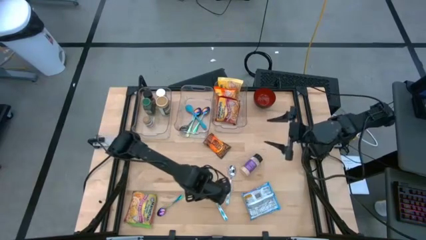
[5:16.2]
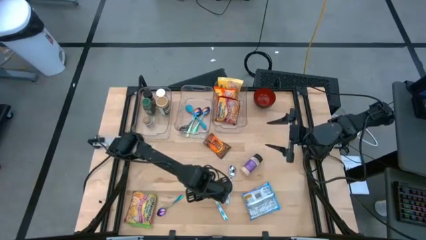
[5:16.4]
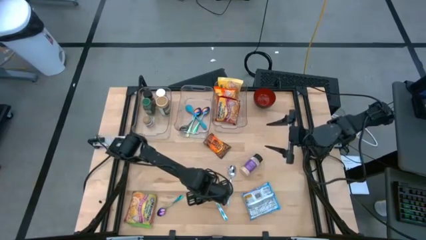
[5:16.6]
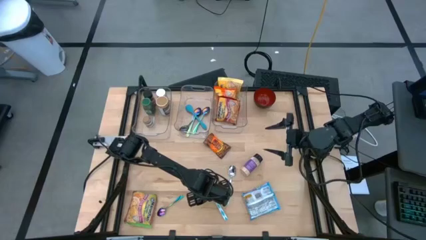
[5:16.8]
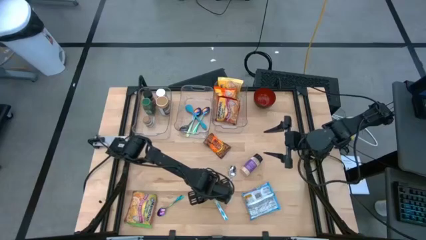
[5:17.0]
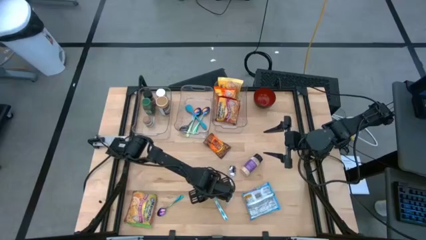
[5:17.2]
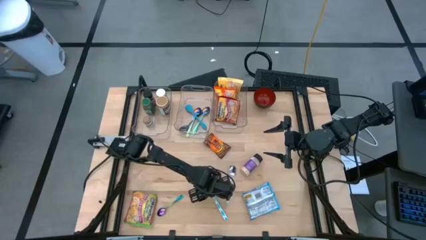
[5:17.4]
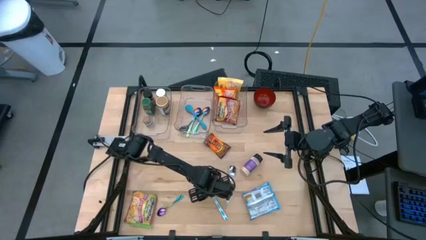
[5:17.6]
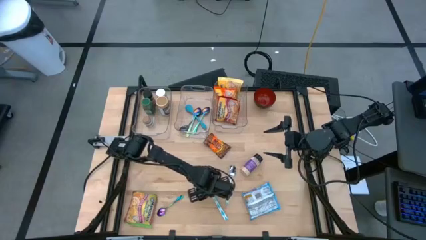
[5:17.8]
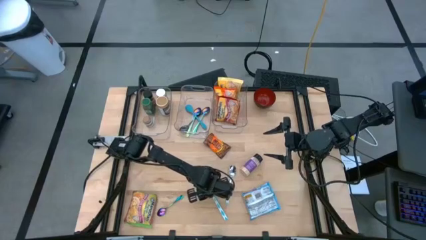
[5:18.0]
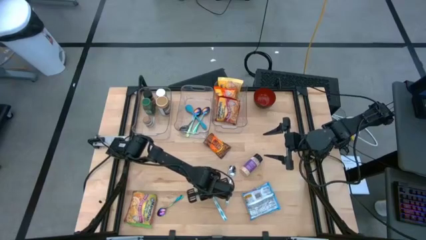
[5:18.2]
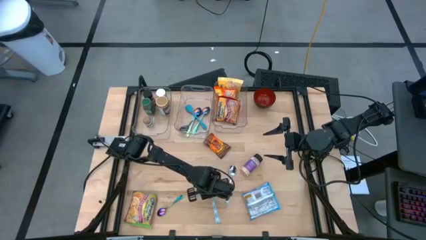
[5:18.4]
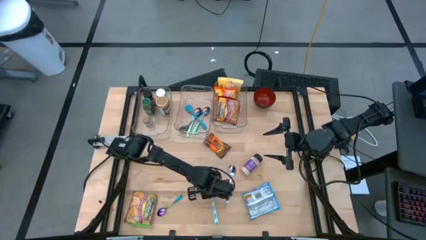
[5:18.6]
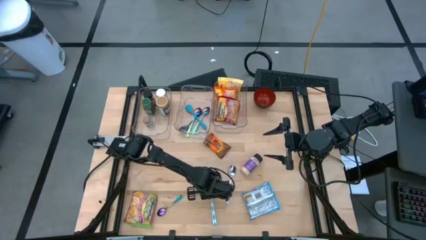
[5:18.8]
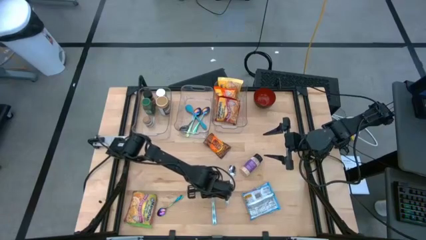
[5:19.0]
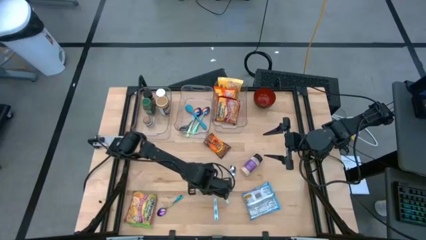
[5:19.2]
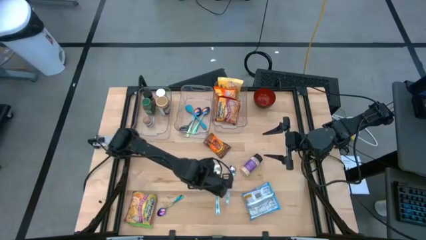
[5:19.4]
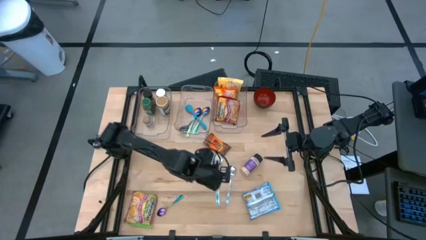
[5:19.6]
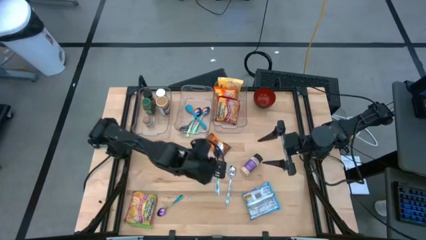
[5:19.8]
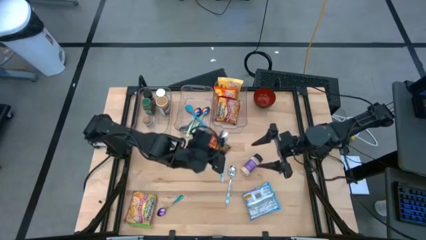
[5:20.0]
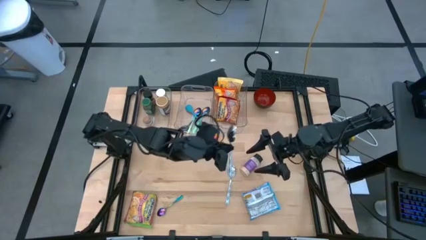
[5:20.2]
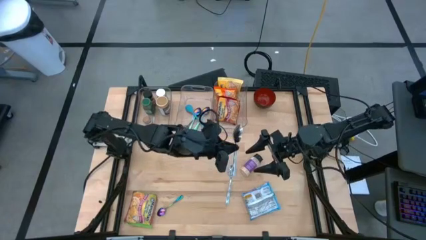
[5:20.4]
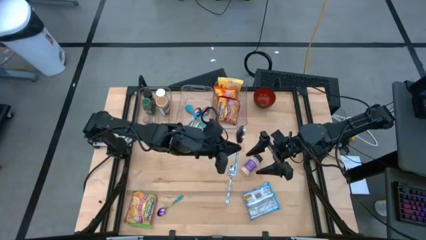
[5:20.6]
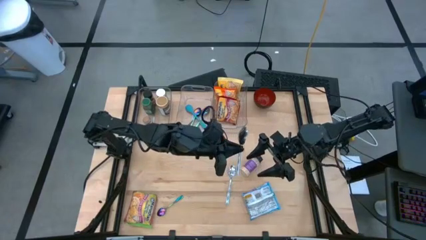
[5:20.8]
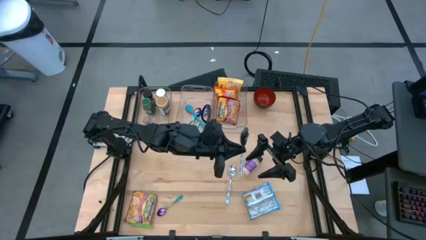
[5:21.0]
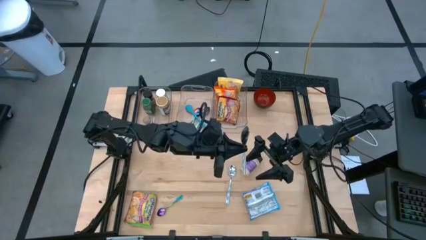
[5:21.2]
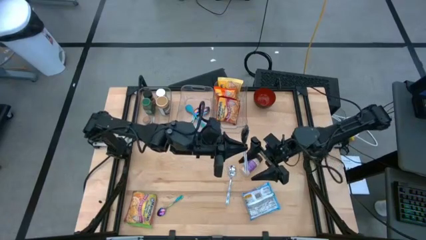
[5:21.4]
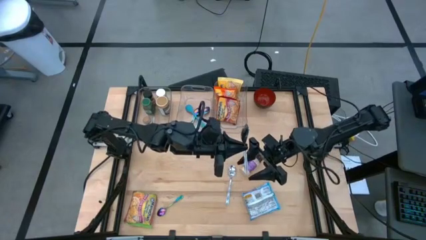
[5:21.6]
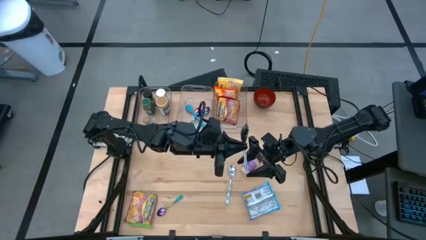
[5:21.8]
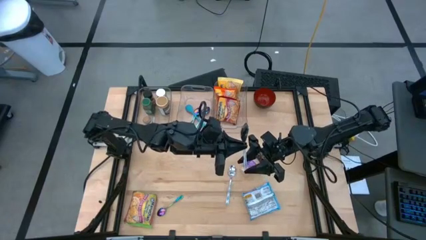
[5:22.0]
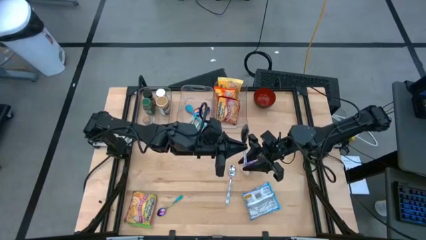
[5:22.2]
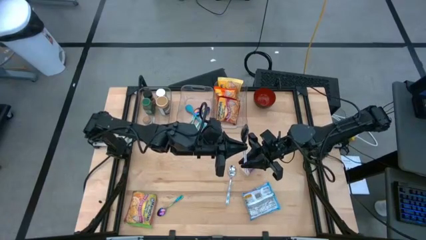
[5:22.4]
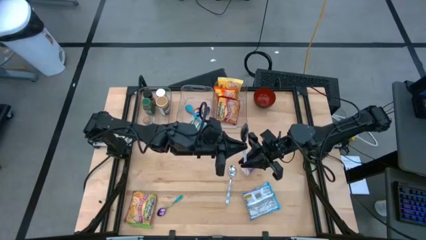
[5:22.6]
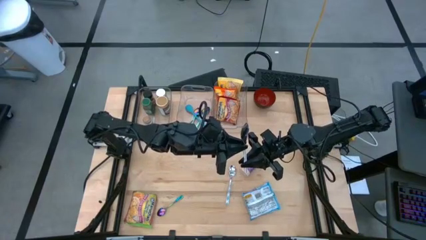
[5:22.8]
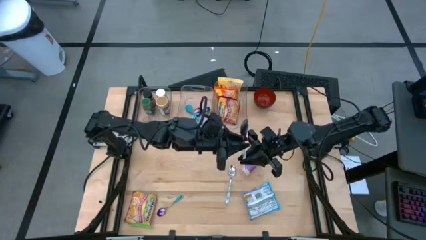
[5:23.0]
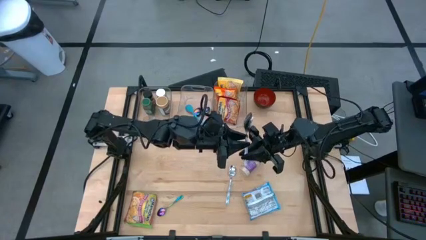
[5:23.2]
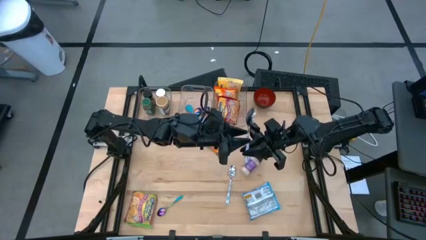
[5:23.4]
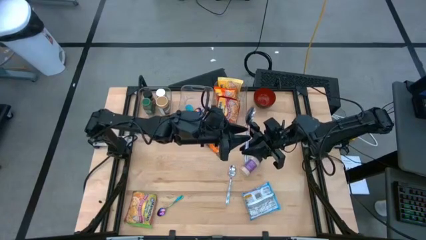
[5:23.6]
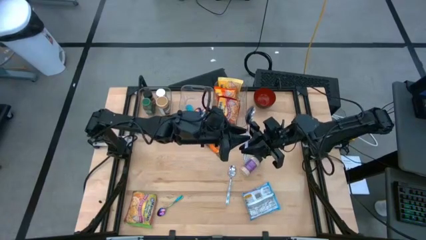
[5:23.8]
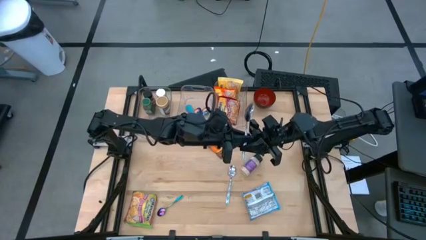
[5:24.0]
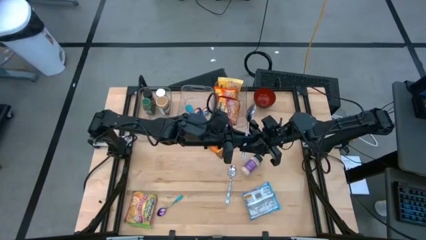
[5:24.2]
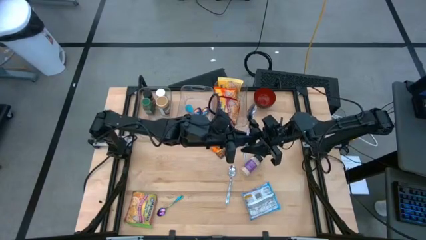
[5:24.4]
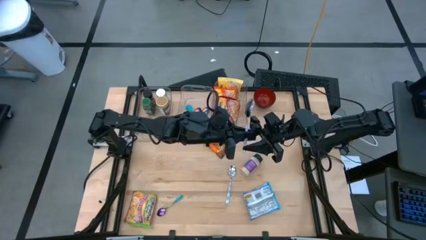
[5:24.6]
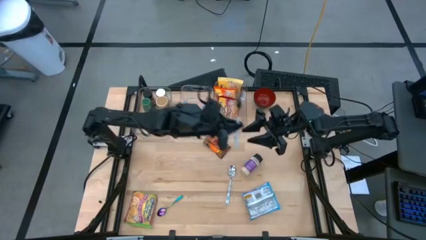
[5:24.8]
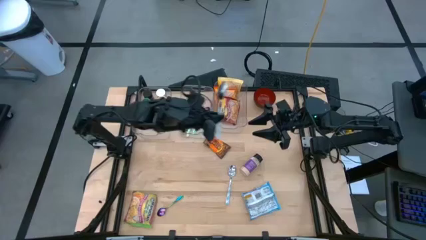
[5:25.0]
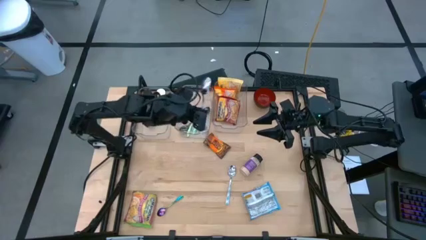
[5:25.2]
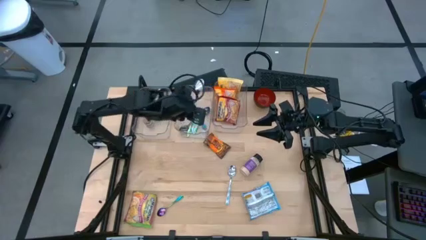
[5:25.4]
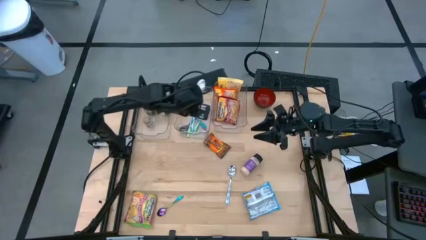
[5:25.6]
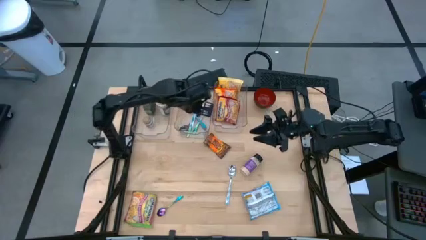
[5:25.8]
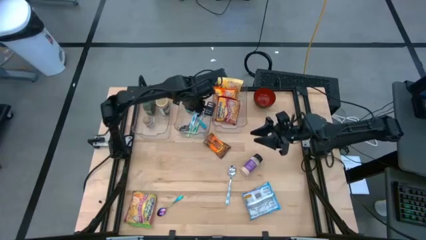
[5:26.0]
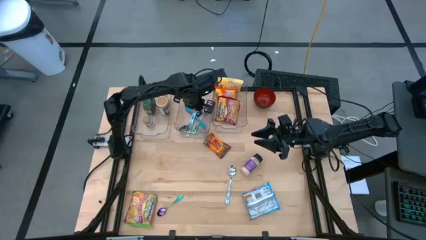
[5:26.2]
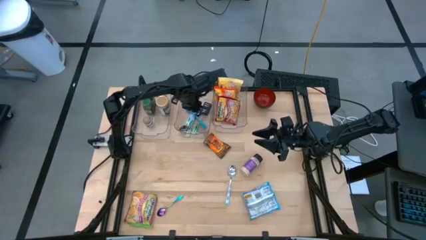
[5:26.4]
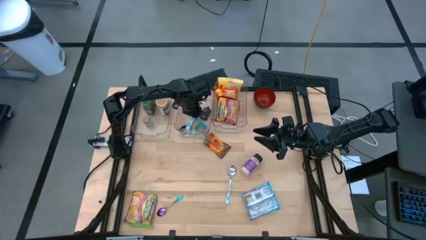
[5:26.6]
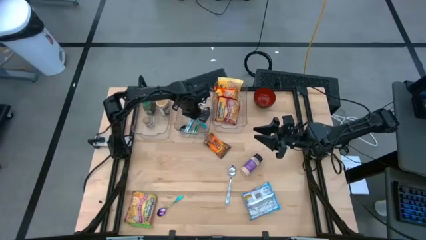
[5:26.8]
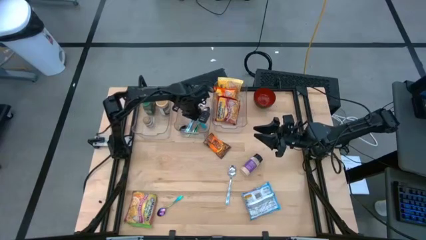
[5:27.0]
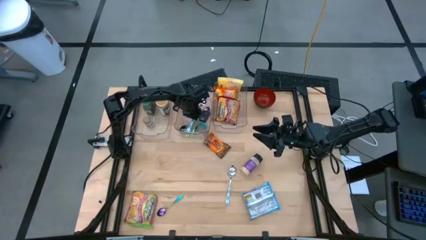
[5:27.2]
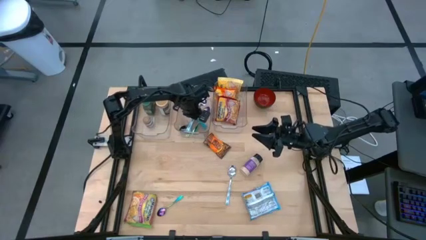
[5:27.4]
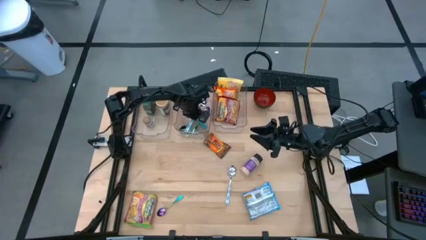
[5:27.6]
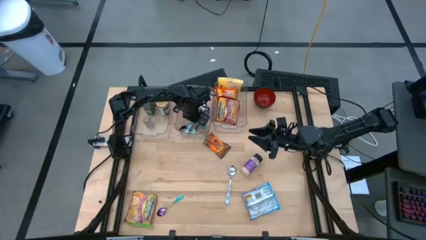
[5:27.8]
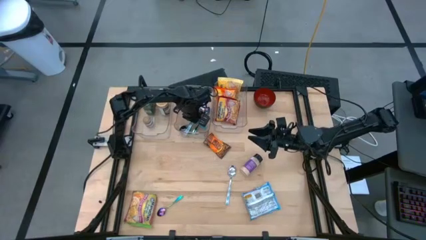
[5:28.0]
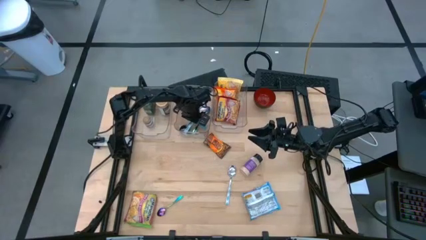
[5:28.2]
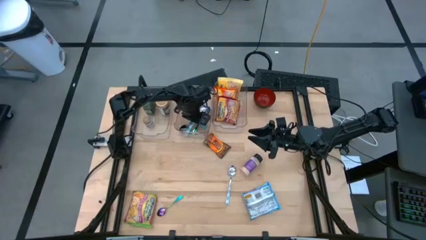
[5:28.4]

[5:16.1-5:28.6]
Task: Pick & Place Food Item
Put the left blue spoon into the middle transparent bin
